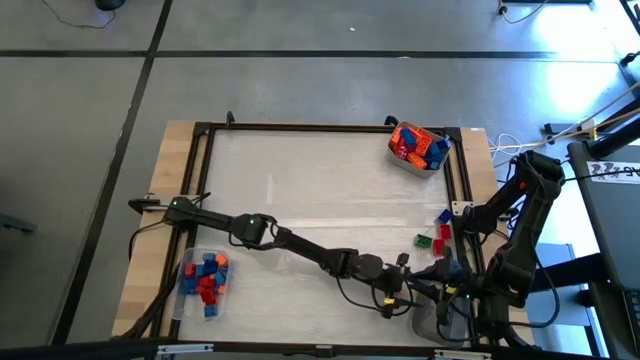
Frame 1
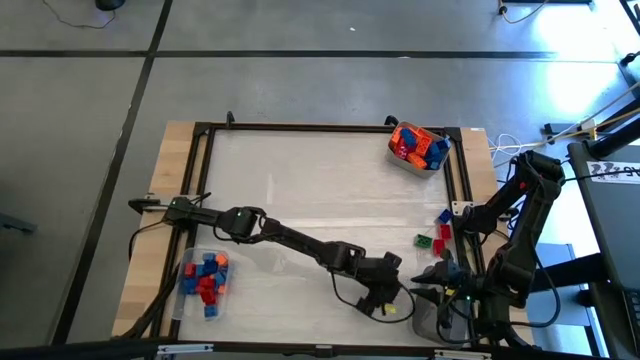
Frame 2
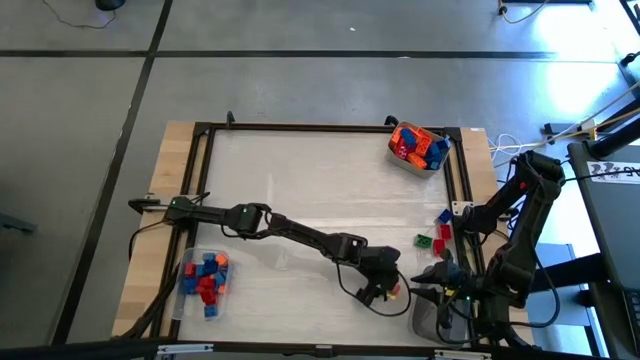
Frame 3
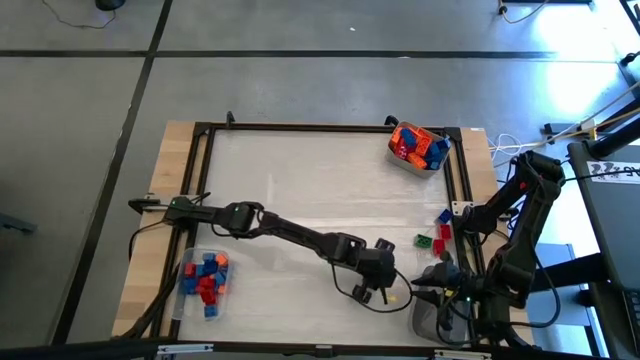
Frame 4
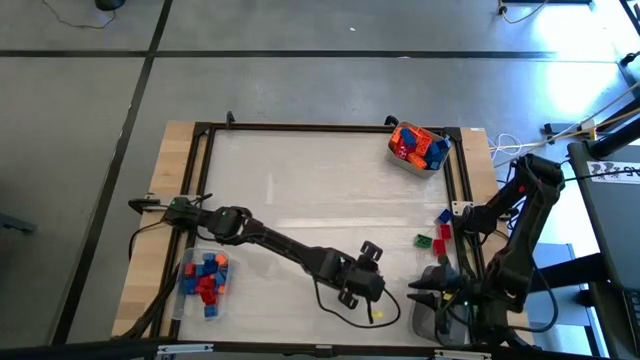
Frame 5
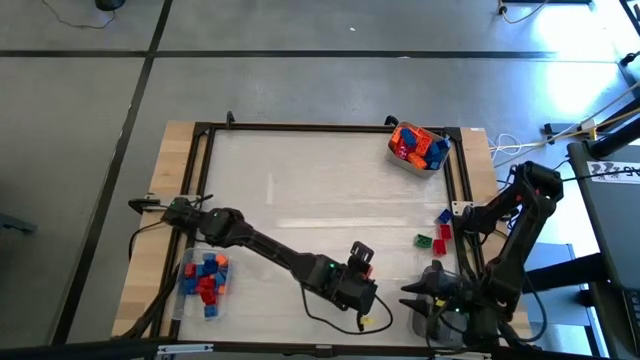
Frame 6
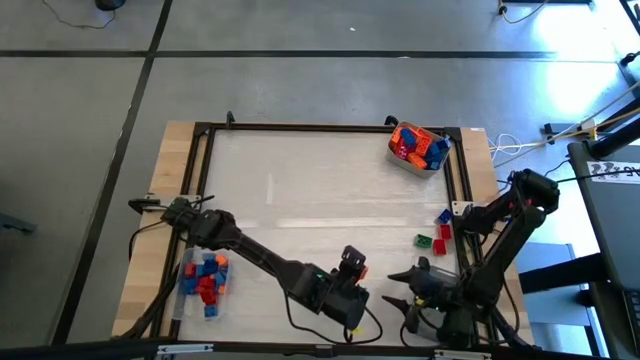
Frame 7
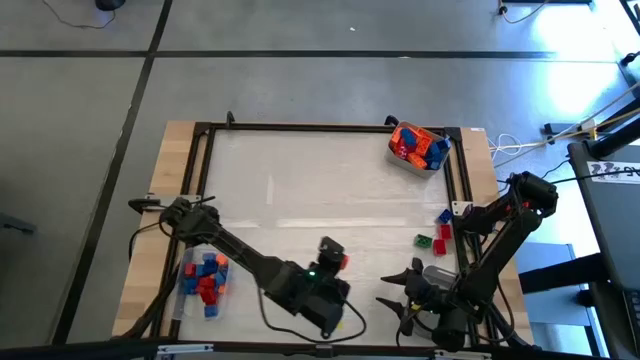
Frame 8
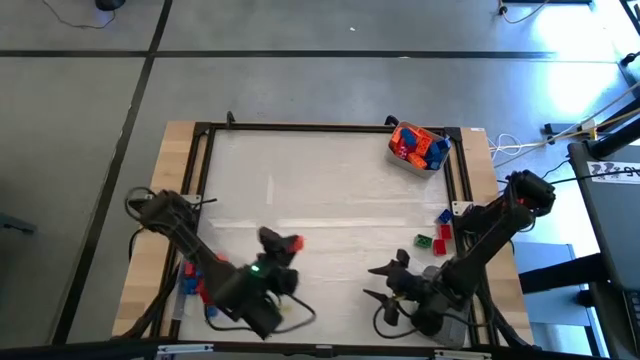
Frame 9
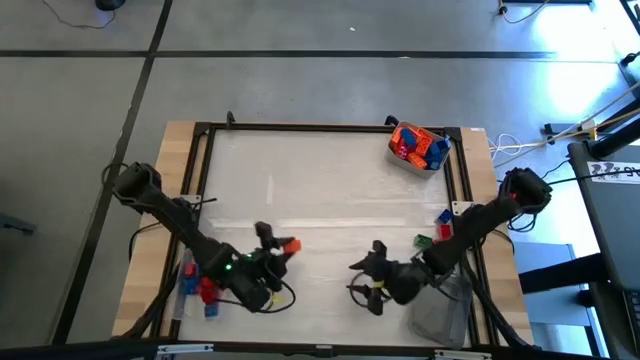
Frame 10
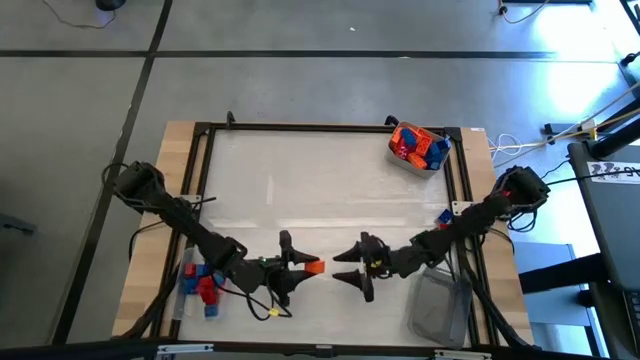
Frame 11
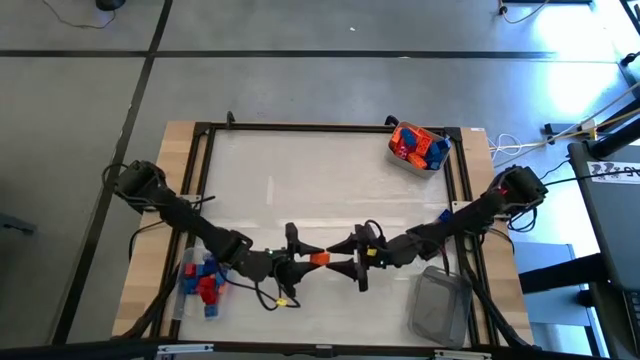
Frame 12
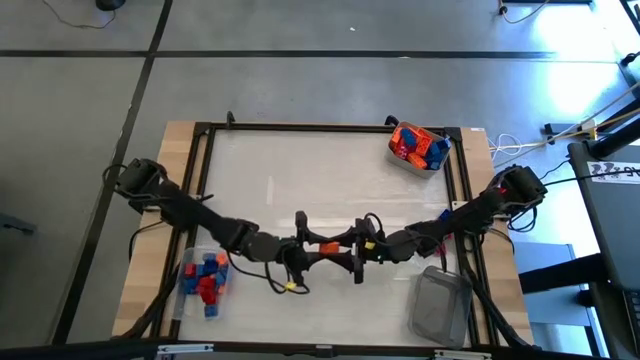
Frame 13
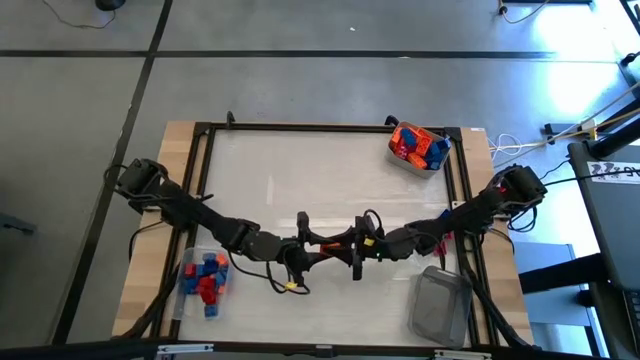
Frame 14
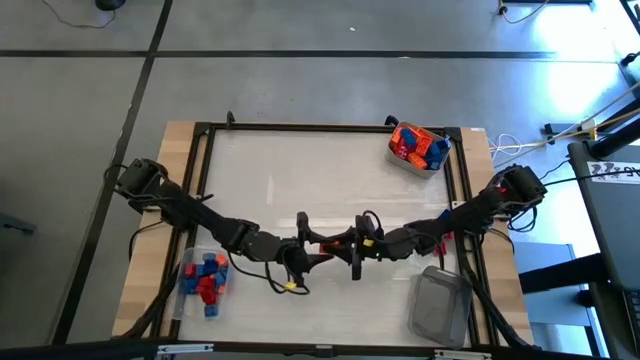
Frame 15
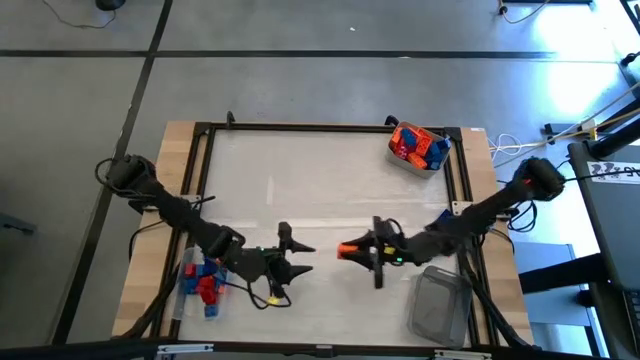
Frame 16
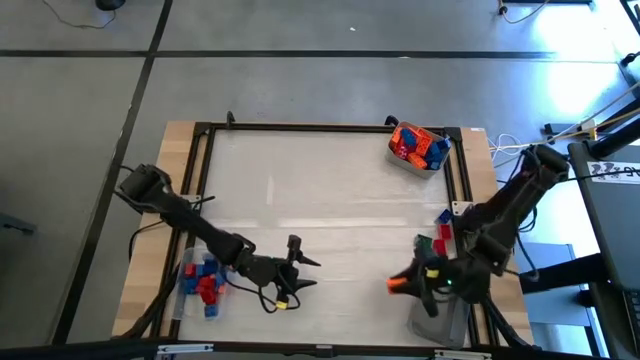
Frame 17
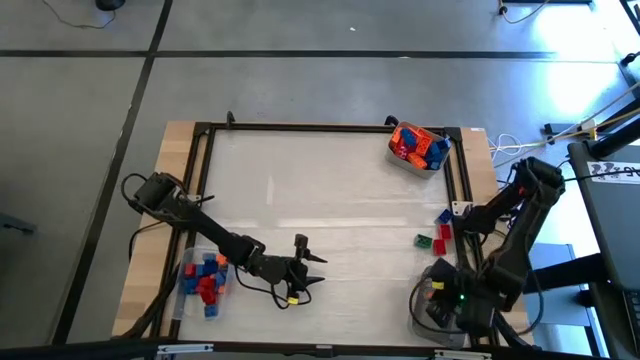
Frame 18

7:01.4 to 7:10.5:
Task: Sort blocks by size
Put the orange game piece into the black bin

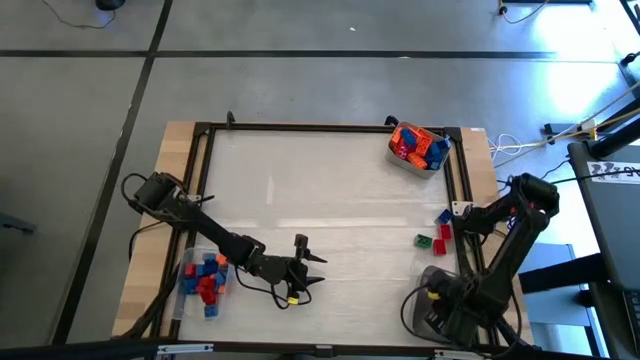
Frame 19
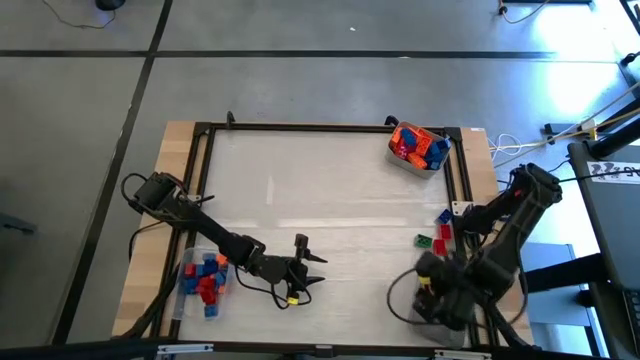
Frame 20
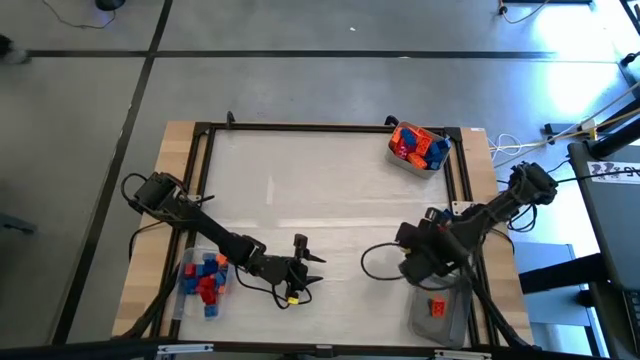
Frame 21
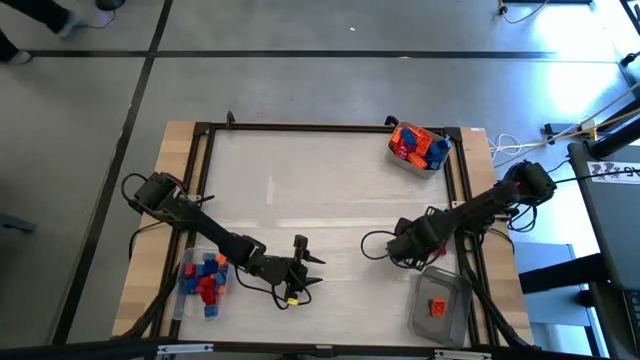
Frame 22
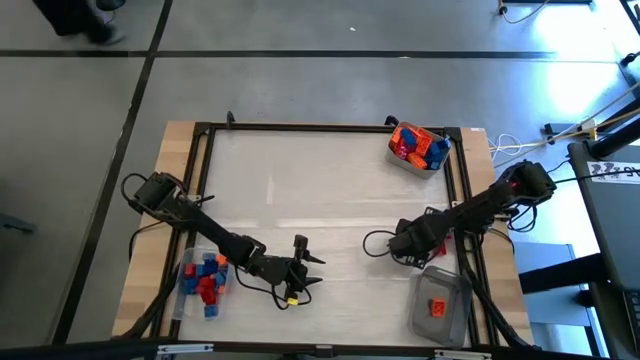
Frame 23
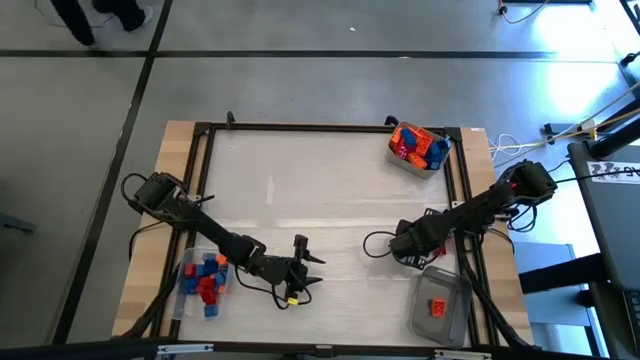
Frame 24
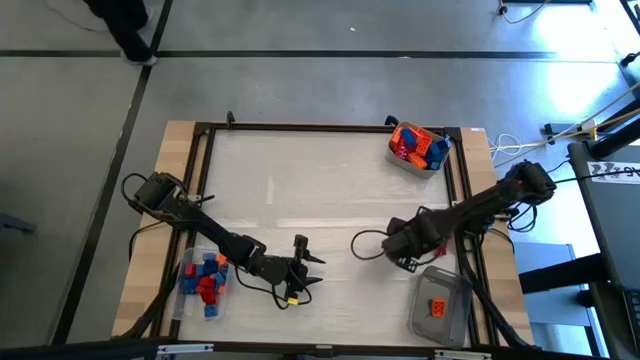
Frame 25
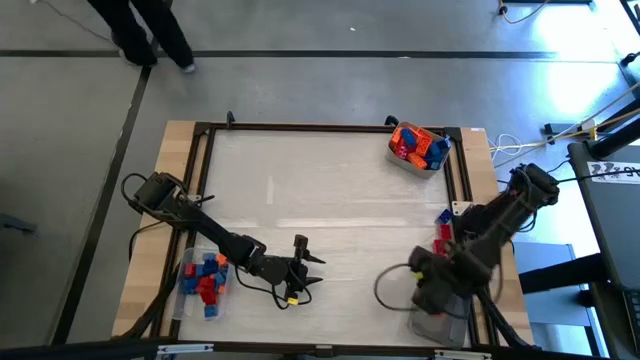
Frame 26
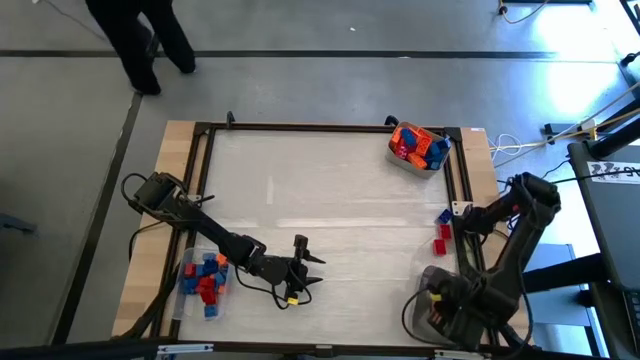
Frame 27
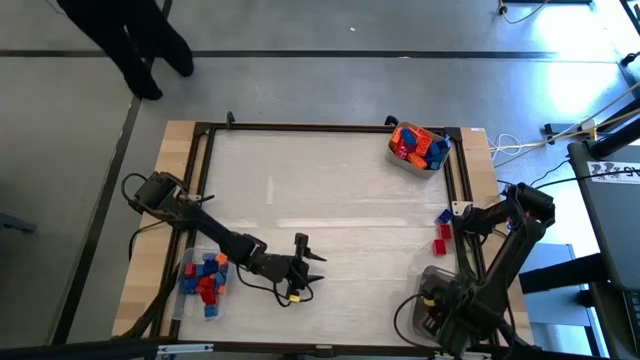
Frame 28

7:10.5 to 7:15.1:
Put the green game piece into the black bin

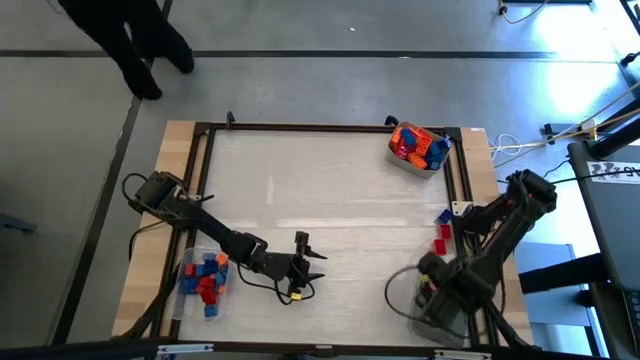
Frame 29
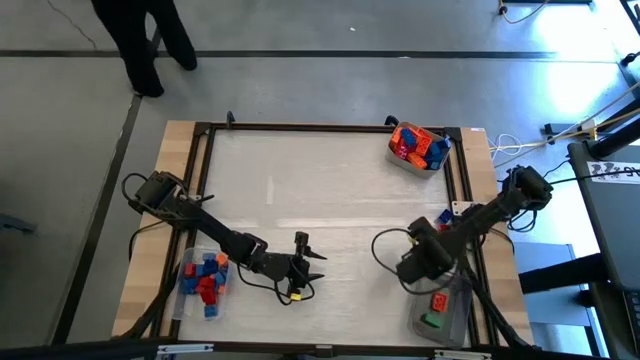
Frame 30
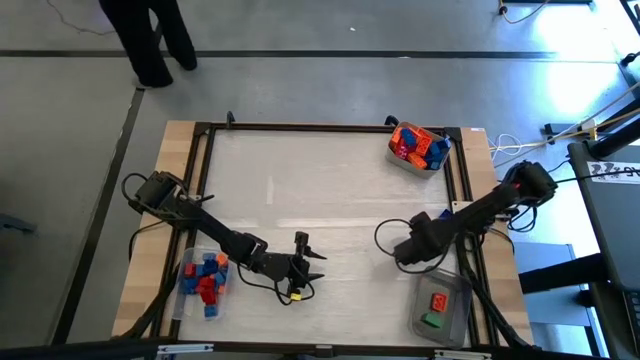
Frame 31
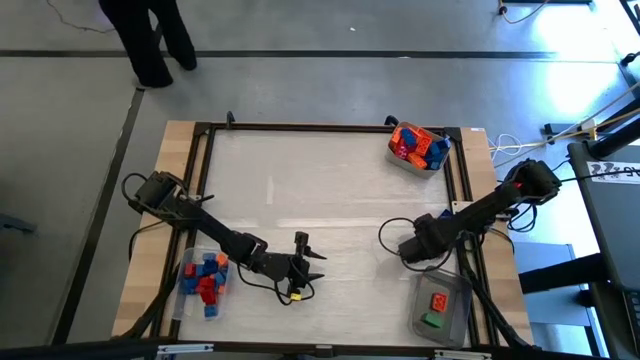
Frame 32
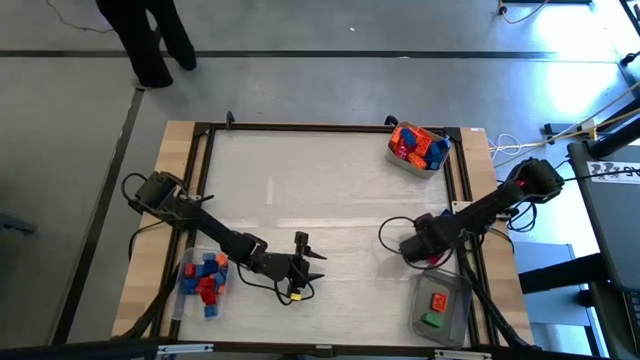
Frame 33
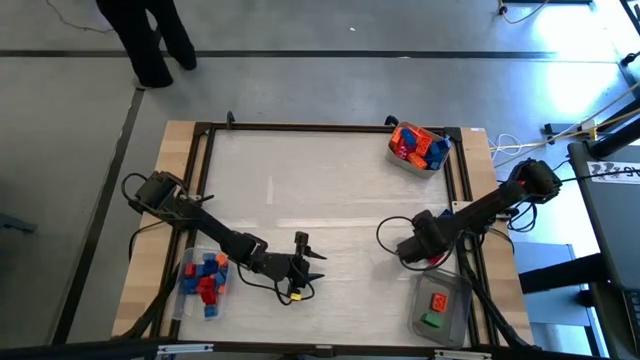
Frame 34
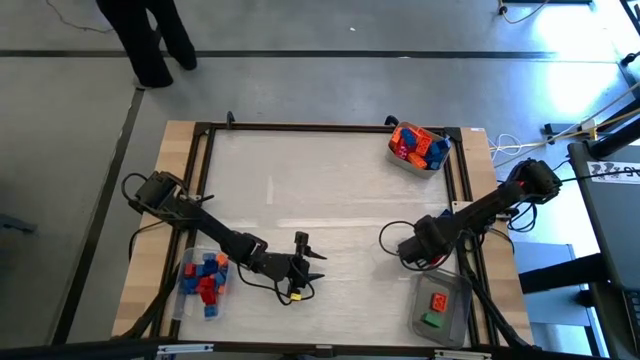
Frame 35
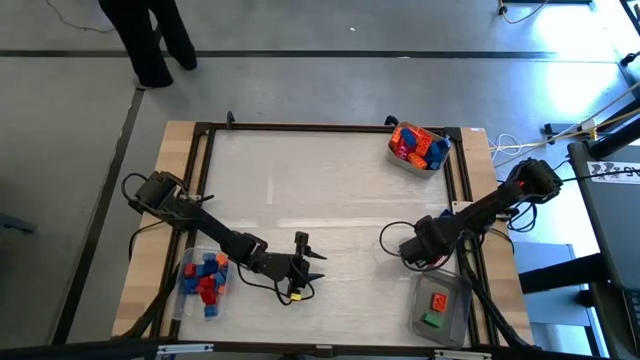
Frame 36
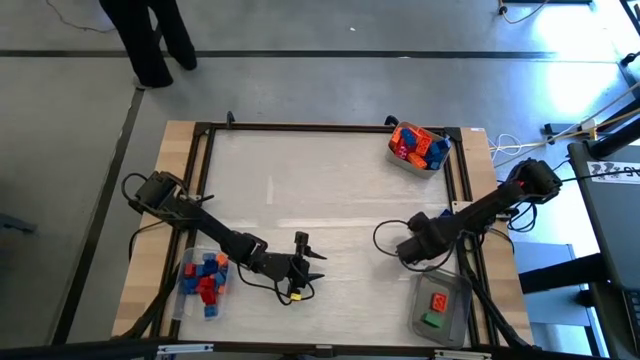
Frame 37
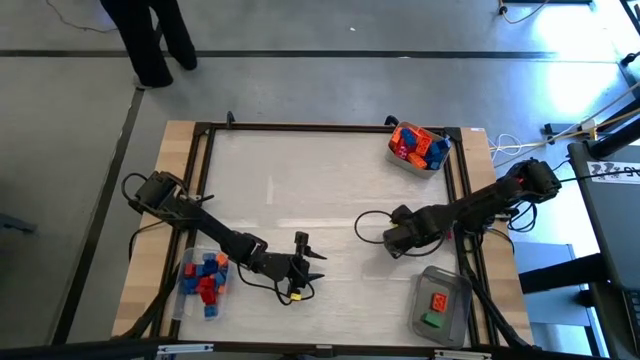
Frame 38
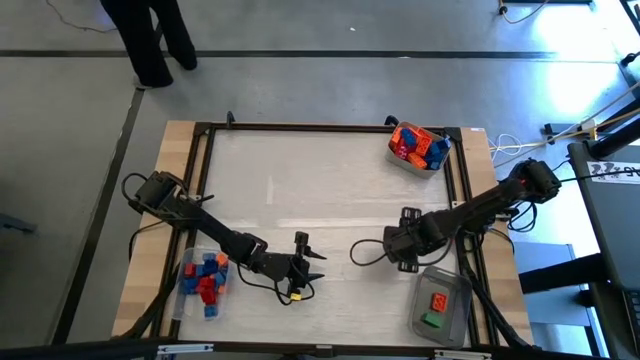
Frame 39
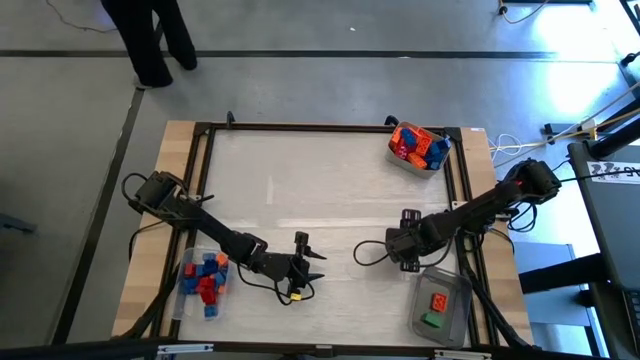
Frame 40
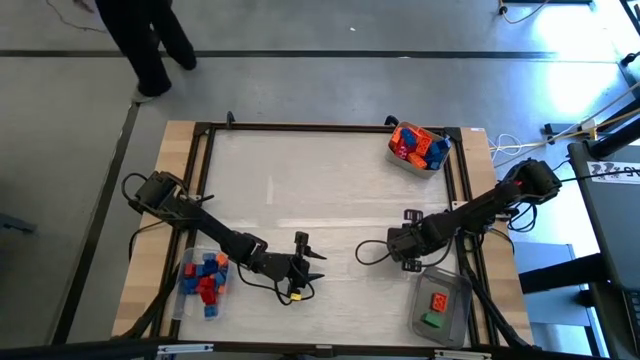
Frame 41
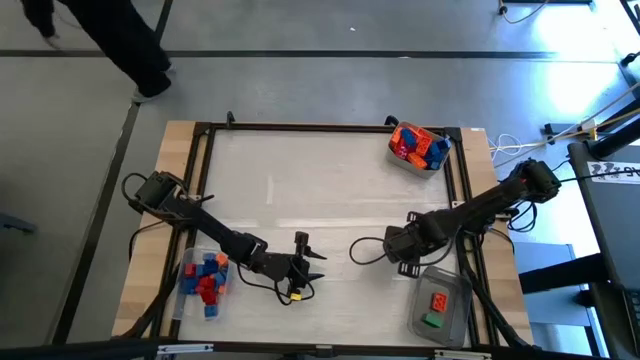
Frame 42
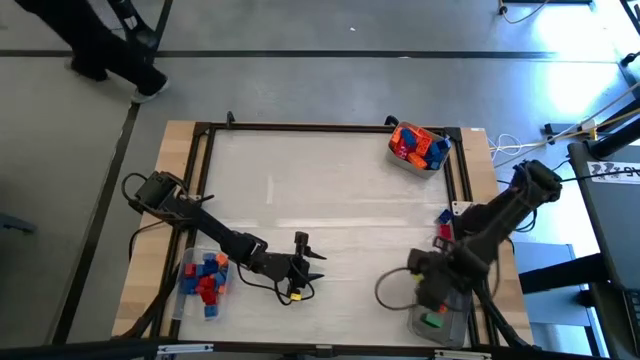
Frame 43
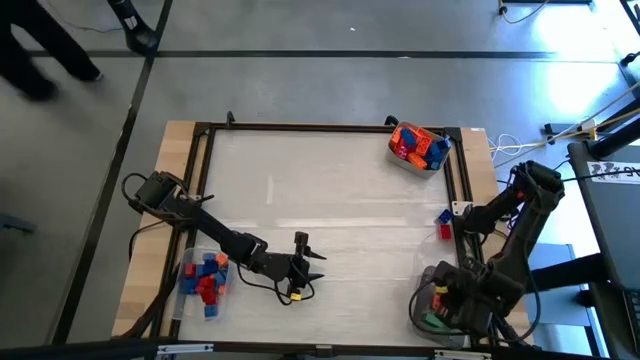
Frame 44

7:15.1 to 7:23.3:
Put the red game piece into the black bin
